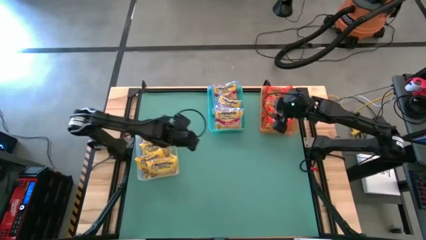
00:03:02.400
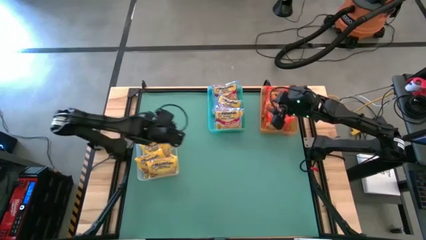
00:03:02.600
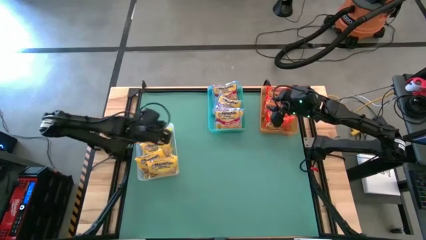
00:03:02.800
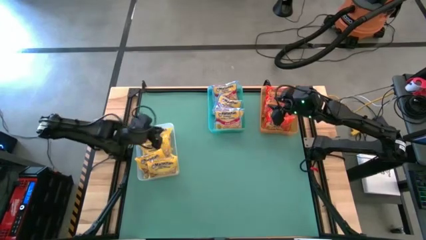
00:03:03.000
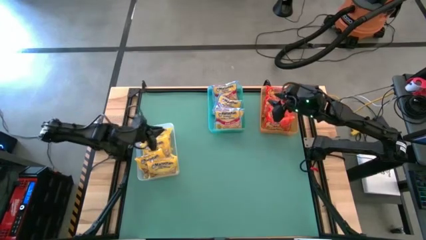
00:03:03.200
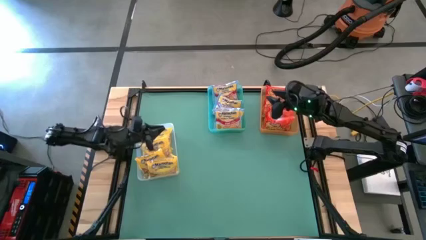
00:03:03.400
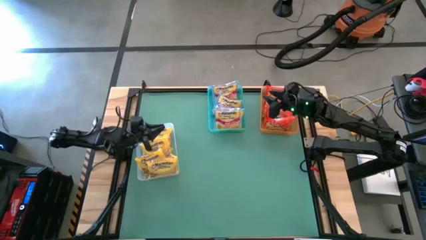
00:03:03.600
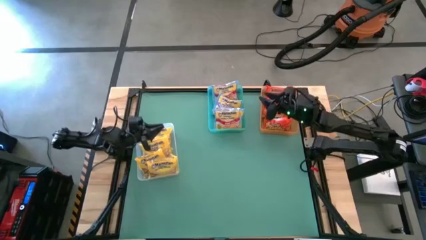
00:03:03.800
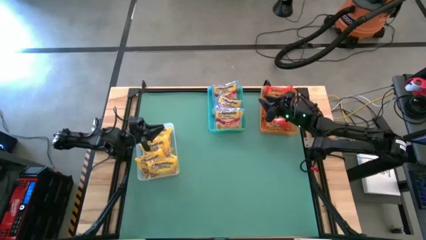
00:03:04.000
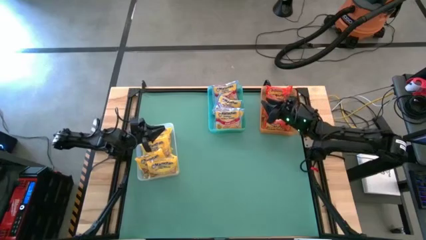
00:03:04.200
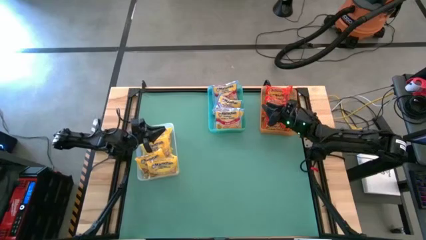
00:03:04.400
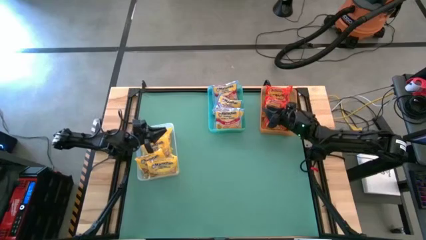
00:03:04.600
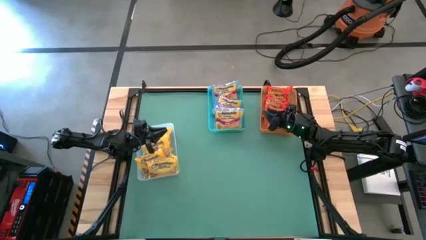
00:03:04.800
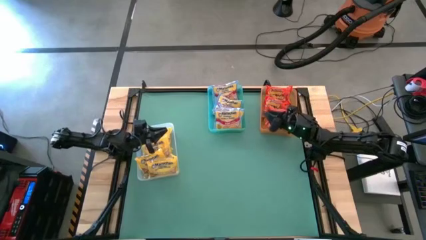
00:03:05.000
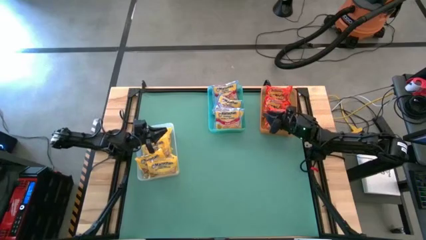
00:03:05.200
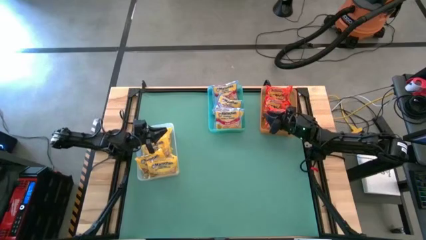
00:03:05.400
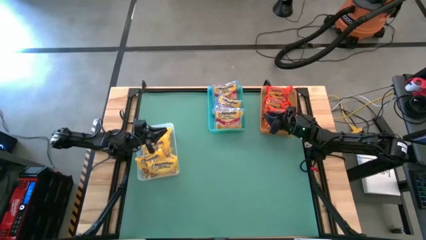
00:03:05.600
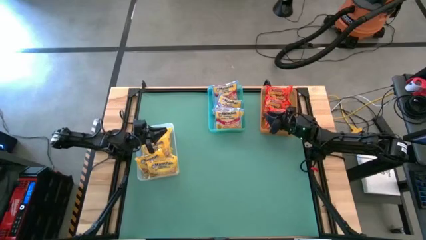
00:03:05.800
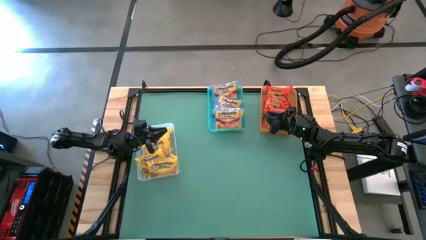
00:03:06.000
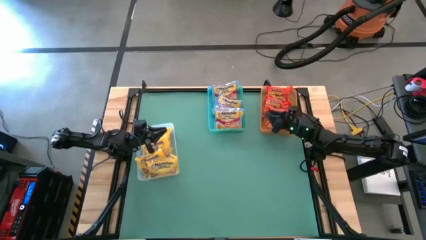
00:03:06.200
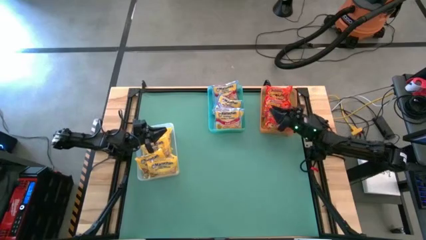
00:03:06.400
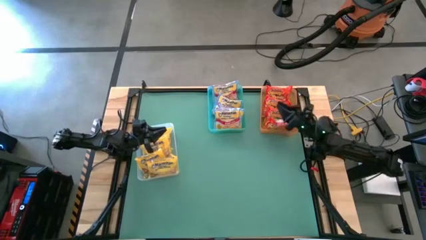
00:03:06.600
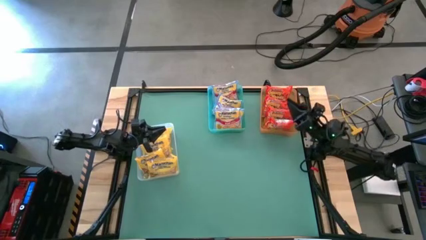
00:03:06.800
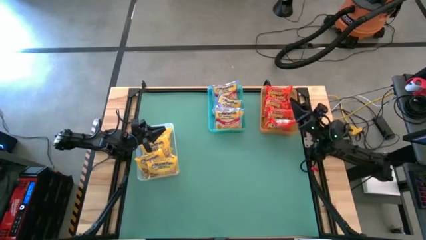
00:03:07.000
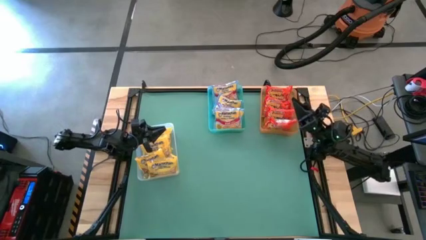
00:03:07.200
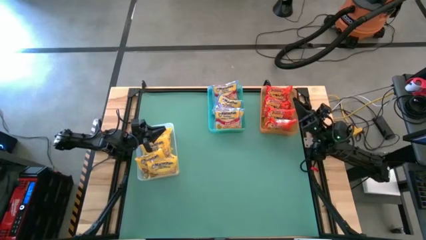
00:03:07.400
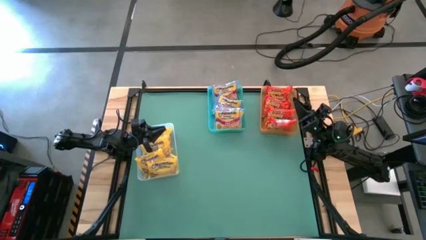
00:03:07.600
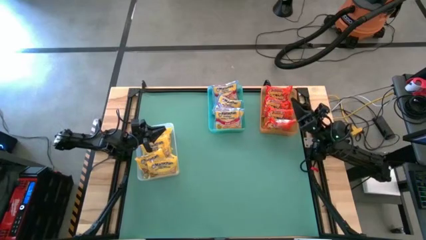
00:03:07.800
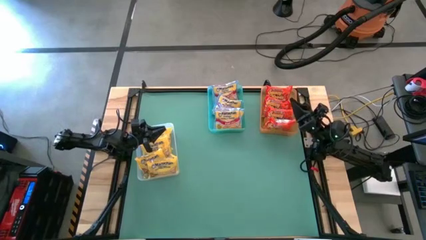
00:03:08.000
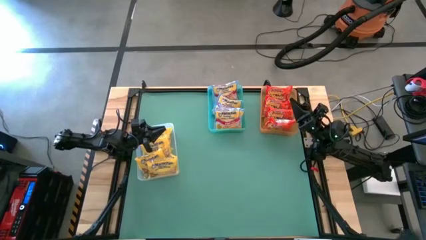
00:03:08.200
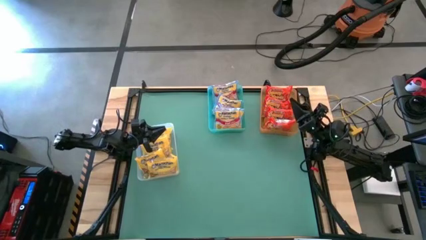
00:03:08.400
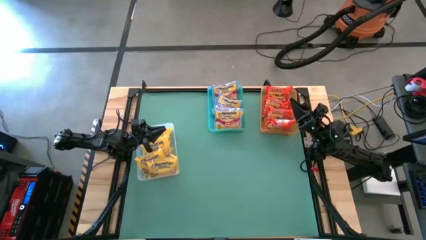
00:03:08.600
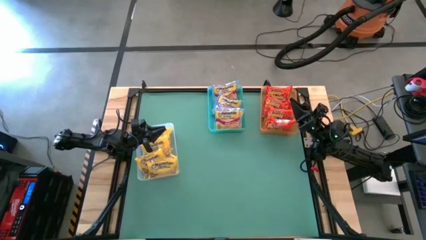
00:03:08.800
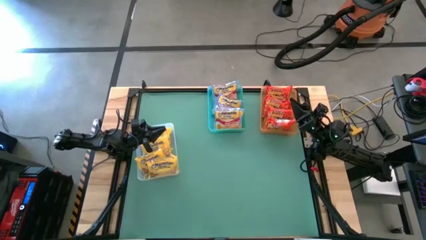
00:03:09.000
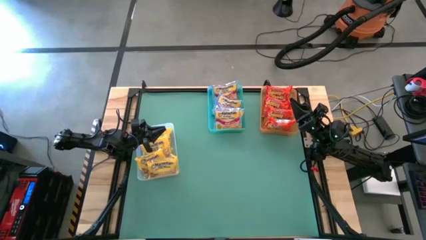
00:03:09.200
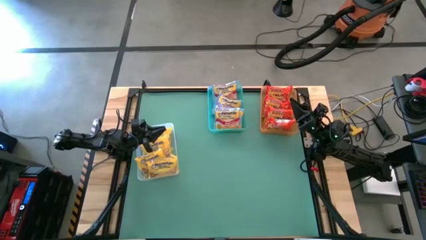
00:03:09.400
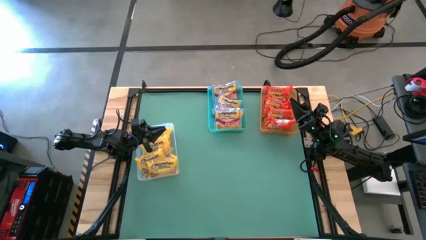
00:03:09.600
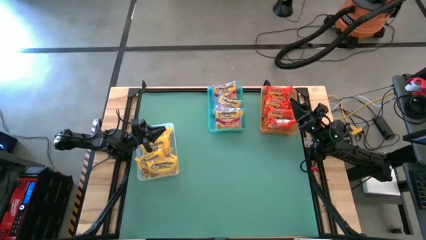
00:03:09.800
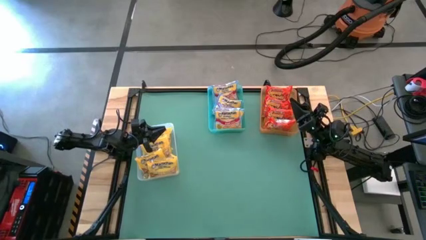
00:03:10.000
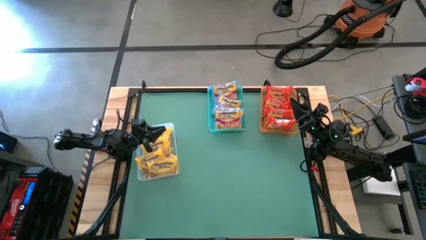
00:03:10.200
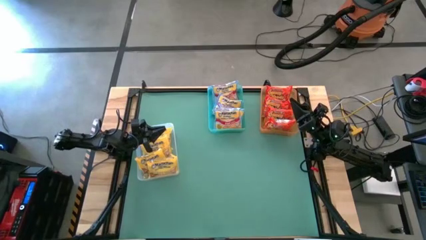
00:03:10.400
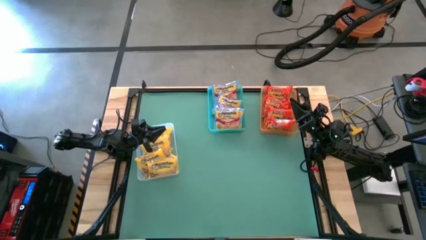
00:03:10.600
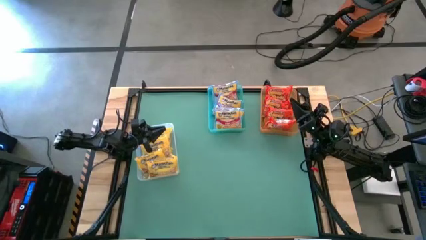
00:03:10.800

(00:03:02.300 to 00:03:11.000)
Task: Sort Maruchan noodles
Return to Home Position

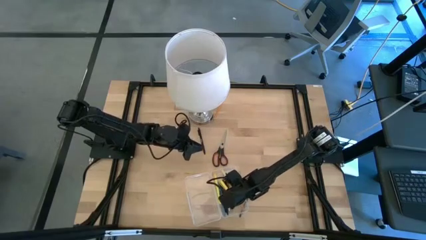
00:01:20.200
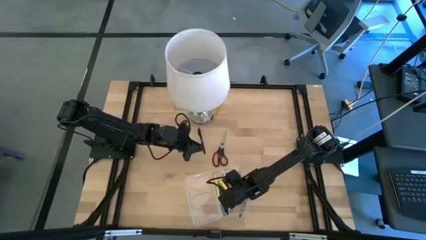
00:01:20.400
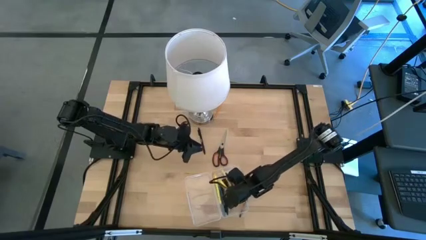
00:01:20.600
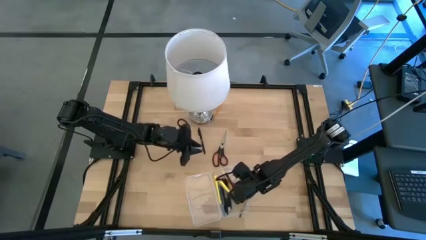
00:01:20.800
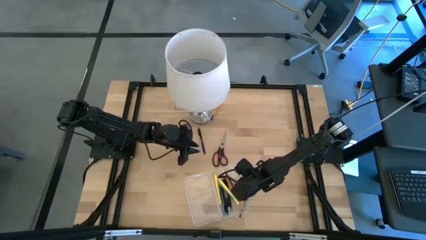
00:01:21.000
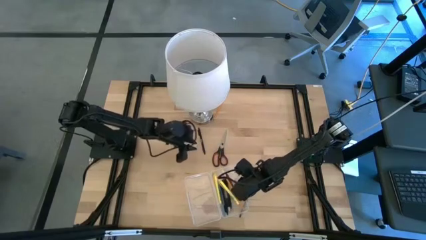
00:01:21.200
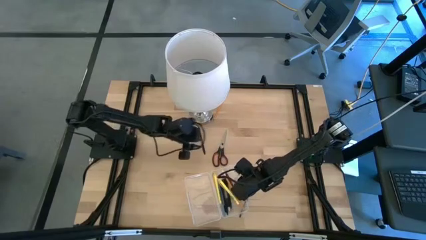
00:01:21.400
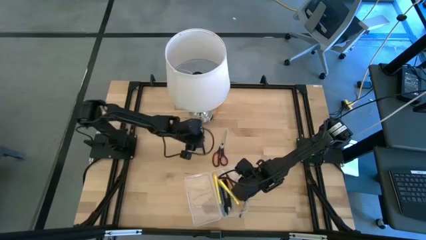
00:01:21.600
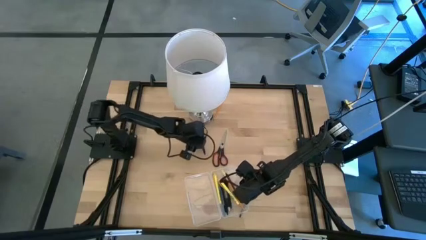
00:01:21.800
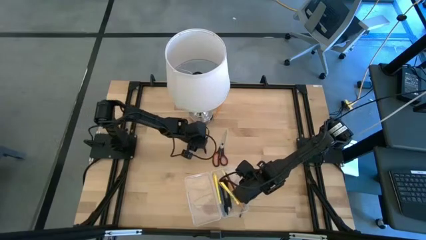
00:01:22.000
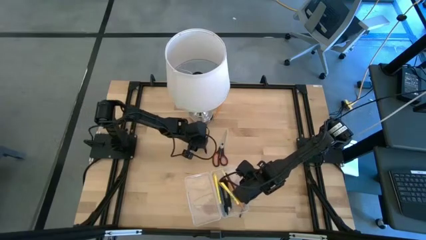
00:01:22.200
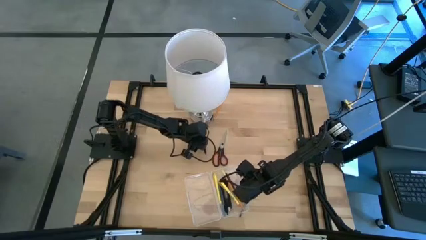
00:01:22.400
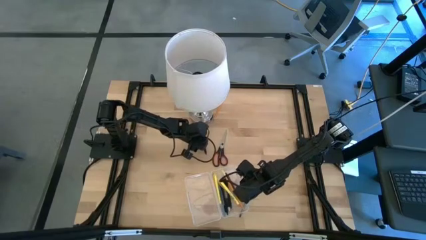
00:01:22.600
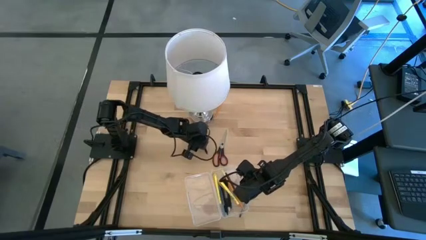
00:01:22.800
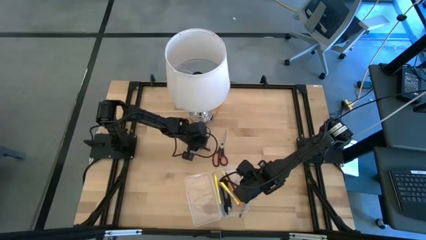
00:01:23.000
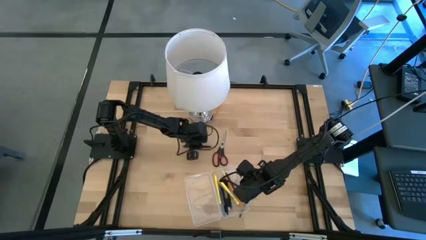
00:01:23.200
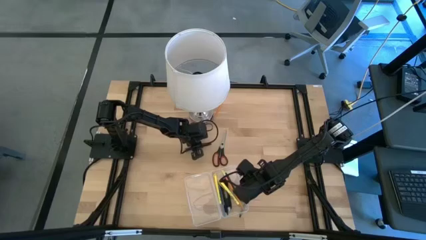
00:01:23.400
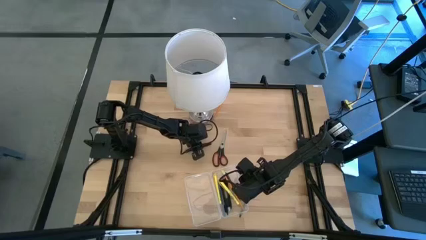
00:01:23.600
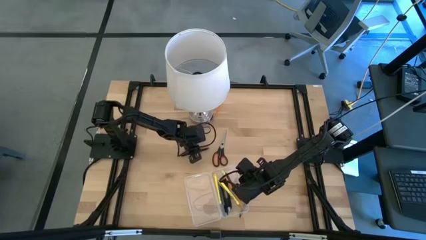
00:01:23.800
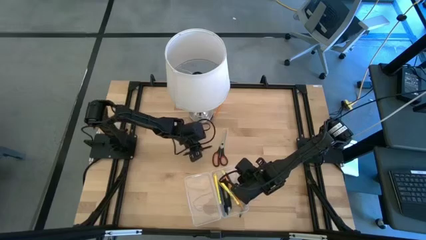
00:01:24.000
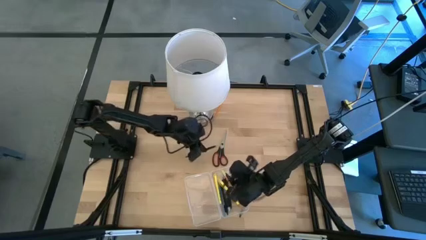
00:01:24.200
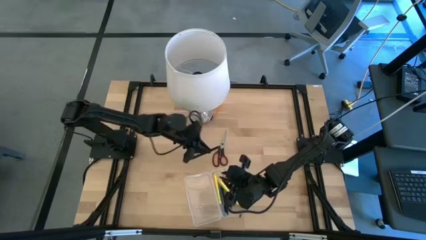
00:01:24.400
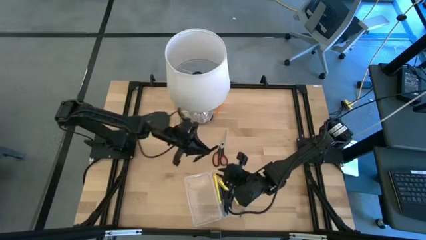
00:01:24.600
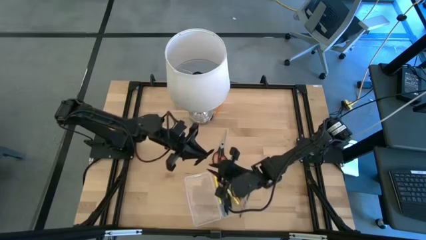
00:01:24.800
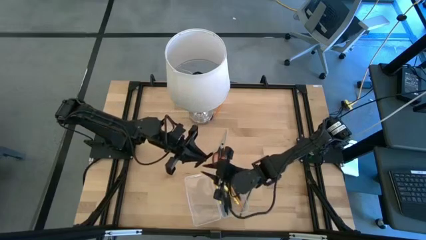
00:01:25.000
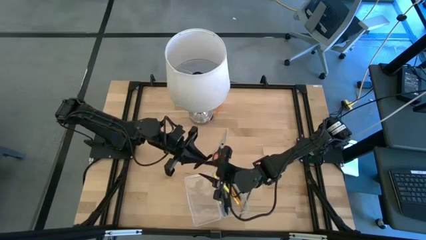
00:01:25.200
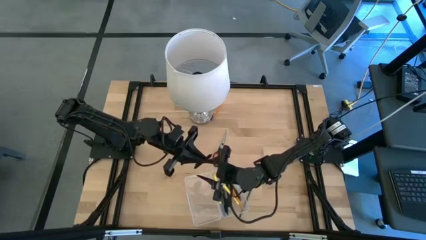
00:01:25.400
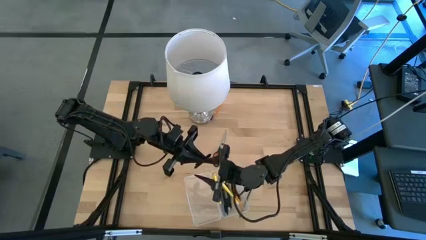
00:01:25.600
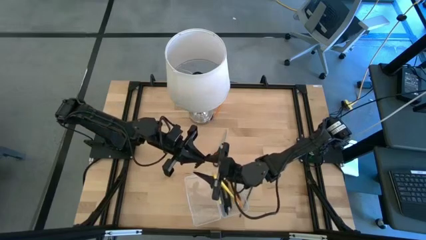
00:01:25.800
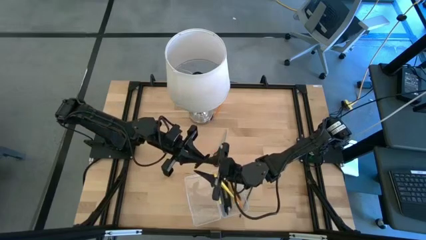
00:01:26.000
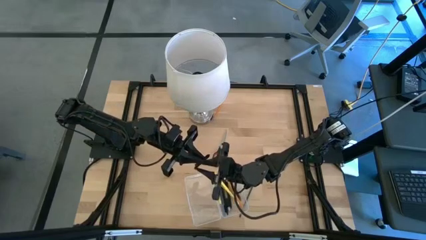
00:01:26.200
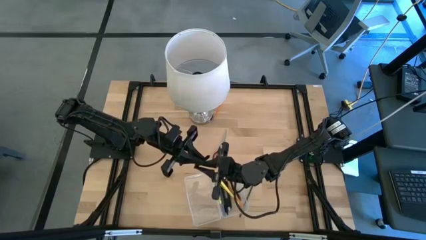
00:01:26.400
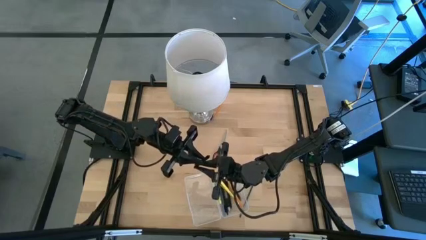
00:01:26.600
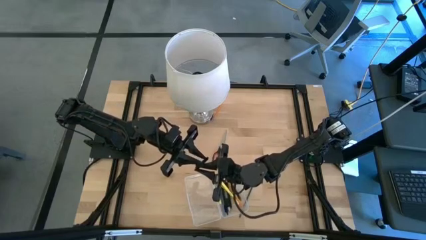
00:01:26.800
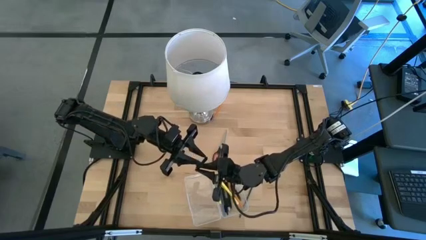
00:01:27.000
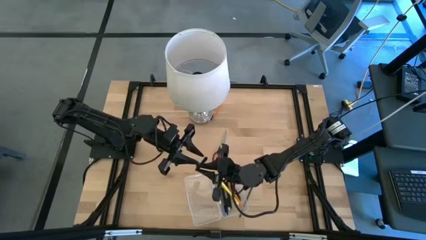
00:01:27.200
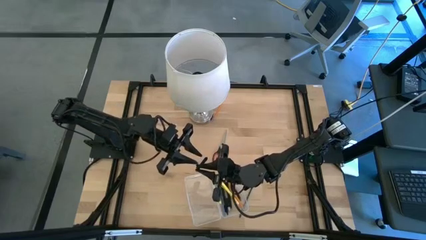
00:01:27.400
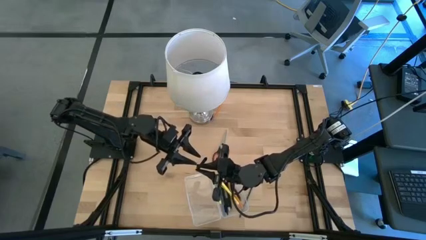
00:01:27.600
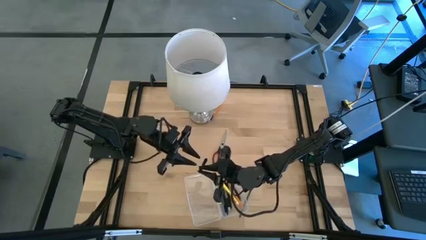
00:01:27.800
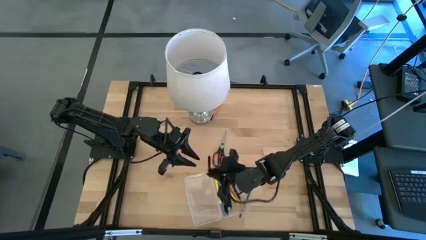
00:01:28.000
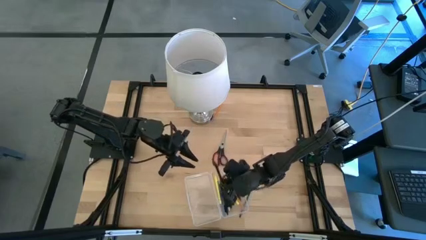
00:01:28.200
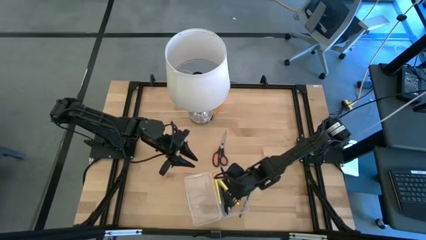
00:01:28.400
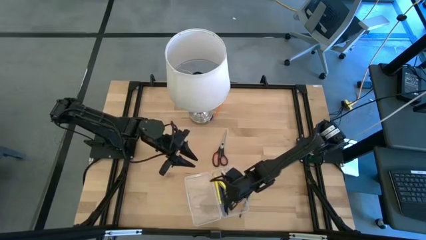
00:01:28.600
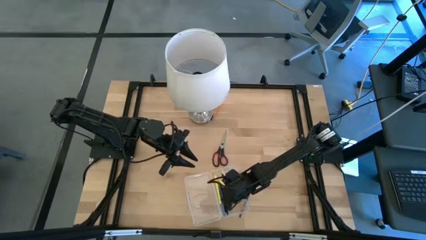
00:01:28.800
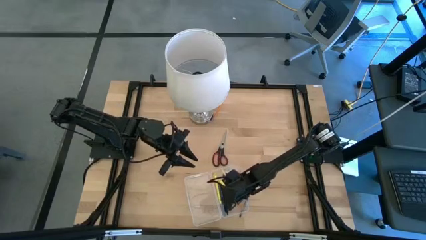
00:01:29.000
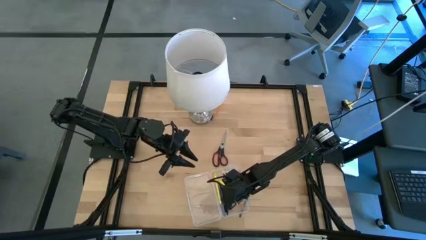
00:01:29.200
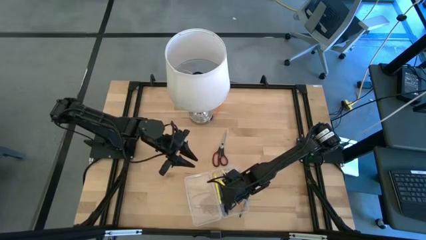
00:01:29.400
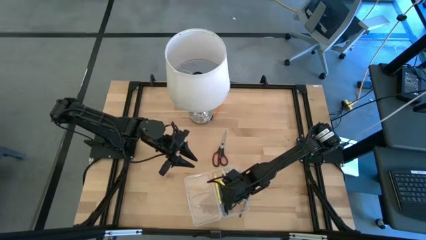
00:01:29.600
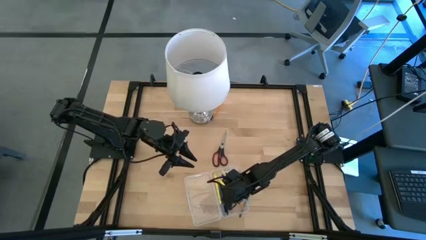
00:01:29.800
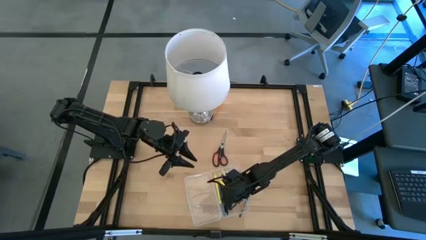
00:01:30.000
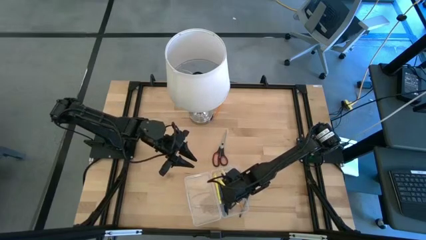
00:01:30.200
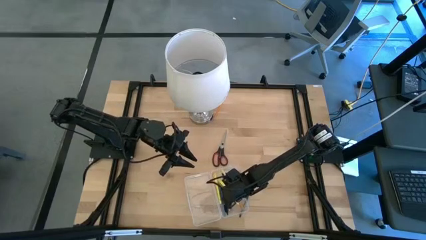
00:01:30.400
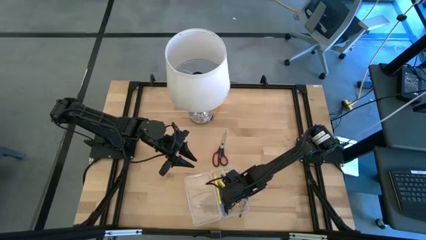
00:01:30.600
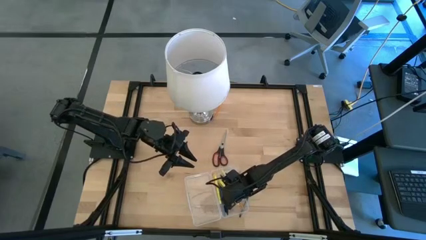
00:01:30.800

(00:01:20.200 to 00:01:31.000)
Task: Pick & place school supplies into a supply box
Put the black pen into the transparent supply box
